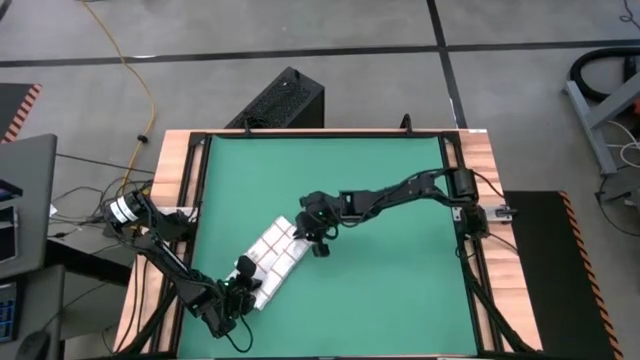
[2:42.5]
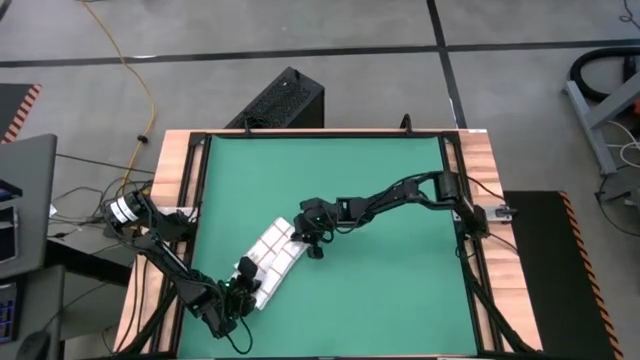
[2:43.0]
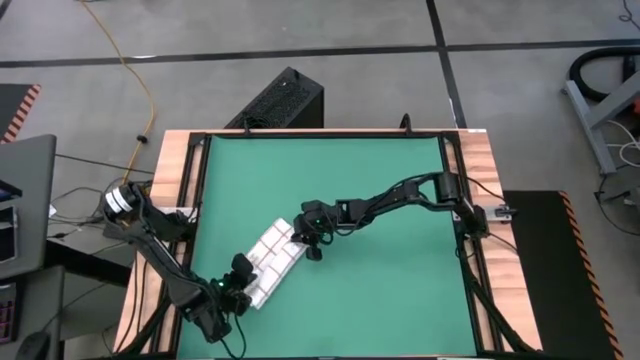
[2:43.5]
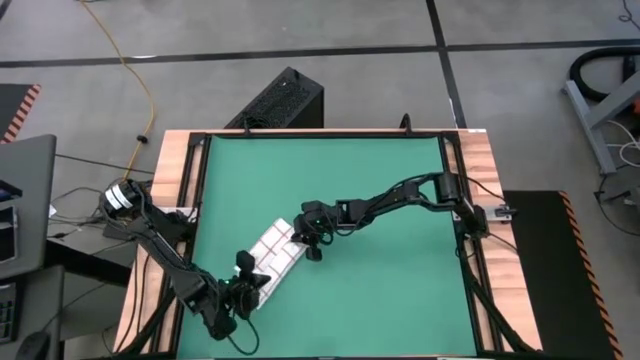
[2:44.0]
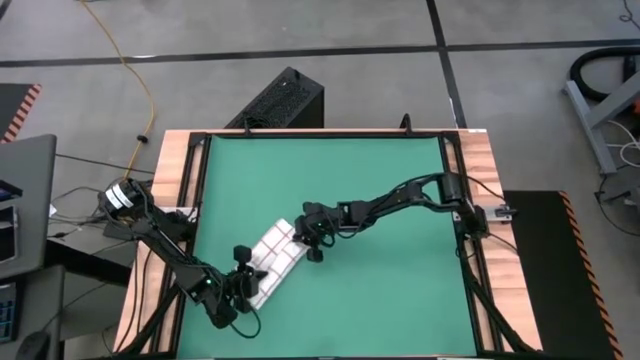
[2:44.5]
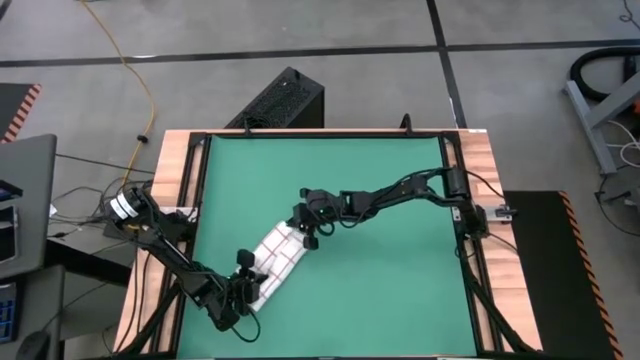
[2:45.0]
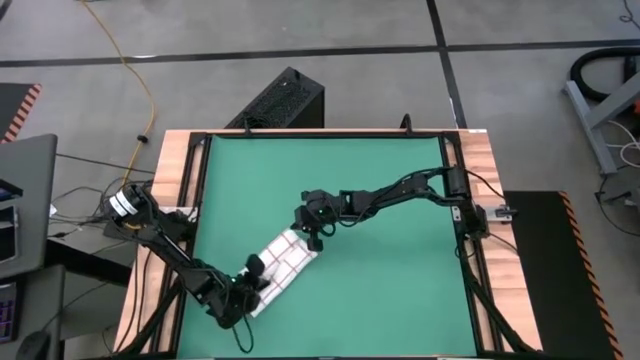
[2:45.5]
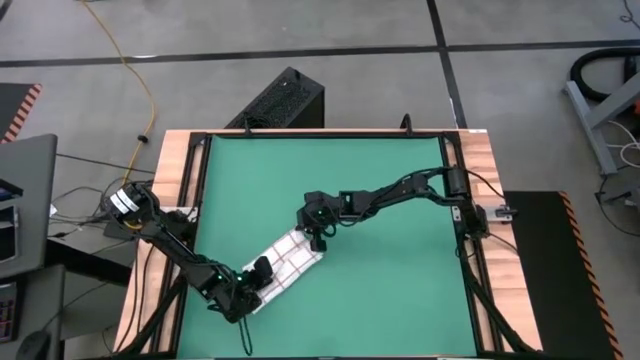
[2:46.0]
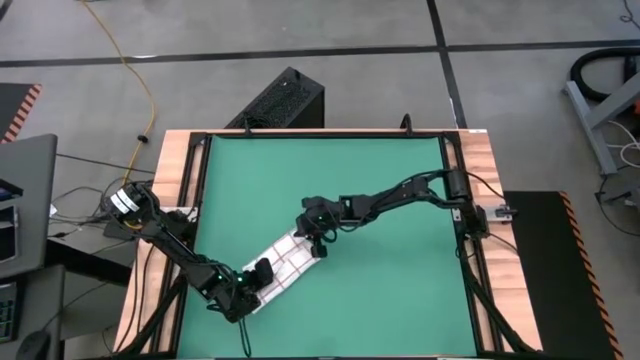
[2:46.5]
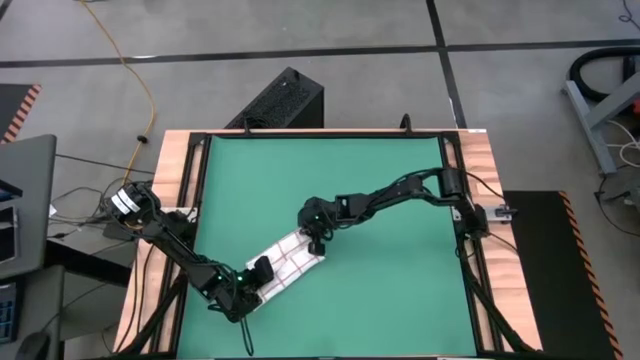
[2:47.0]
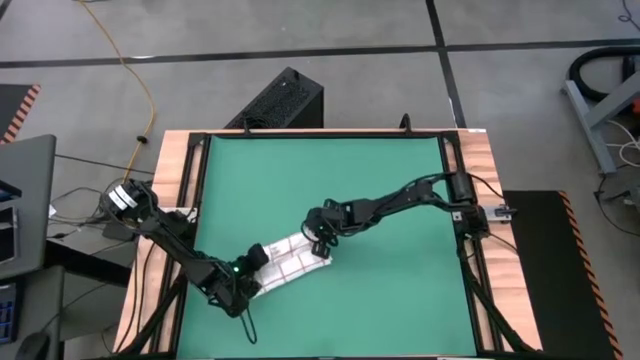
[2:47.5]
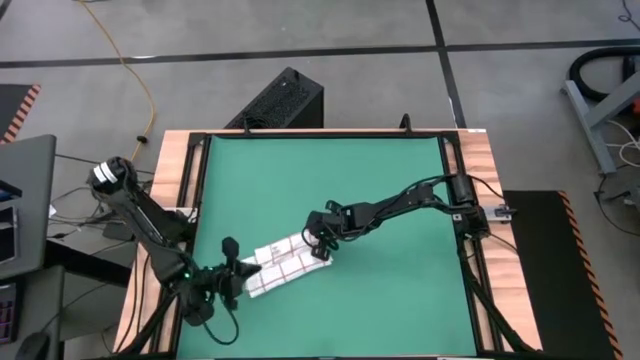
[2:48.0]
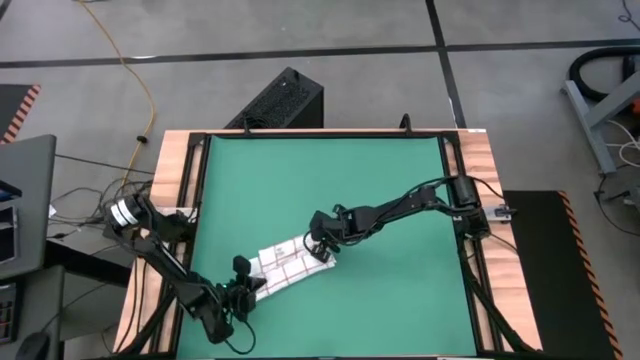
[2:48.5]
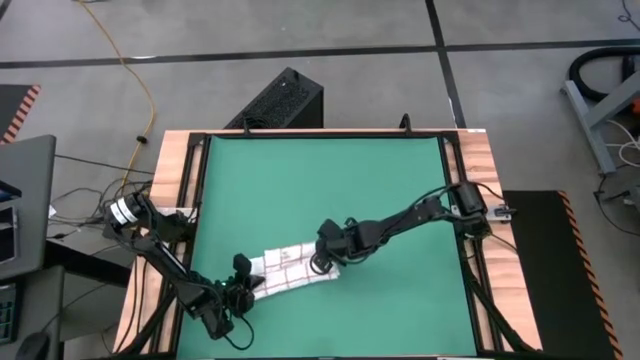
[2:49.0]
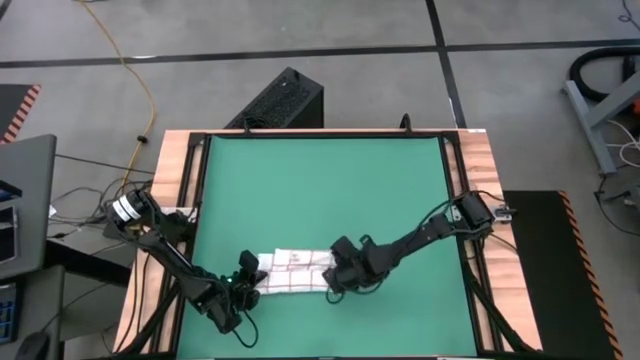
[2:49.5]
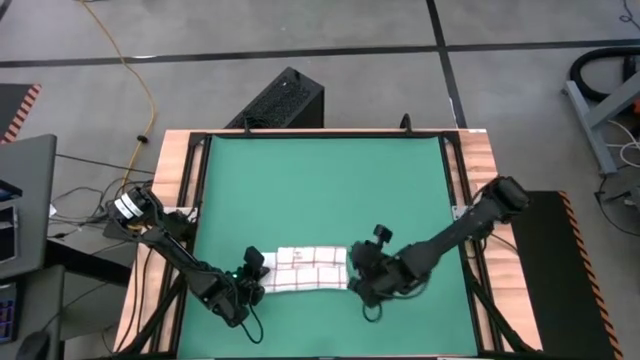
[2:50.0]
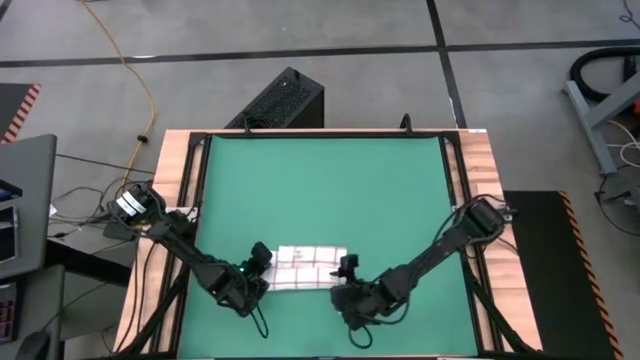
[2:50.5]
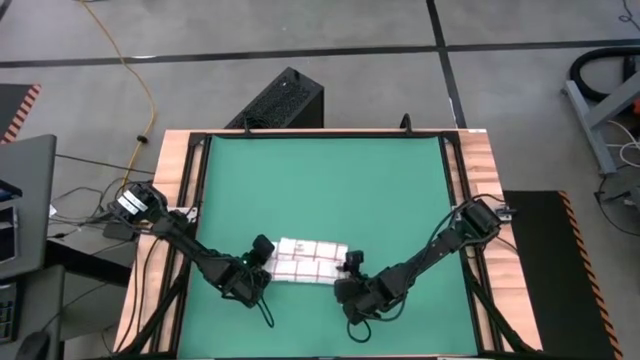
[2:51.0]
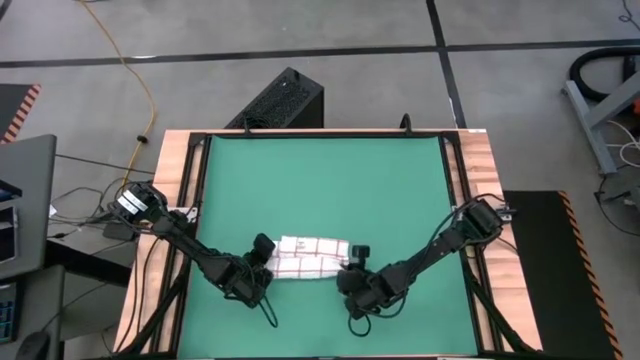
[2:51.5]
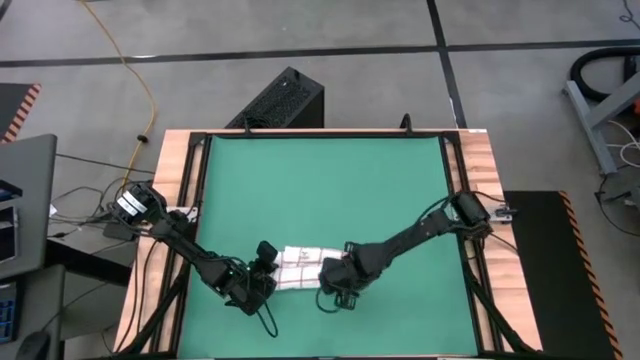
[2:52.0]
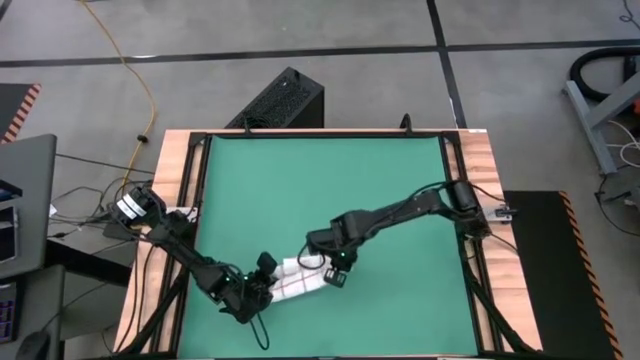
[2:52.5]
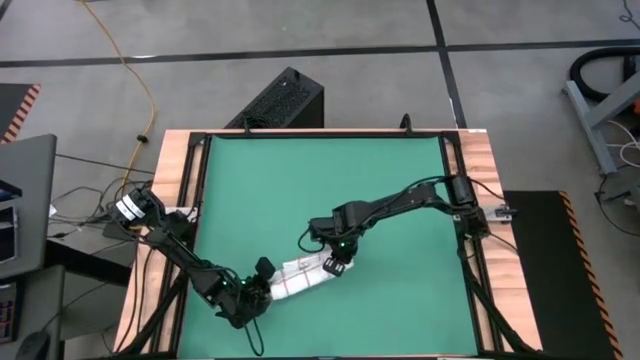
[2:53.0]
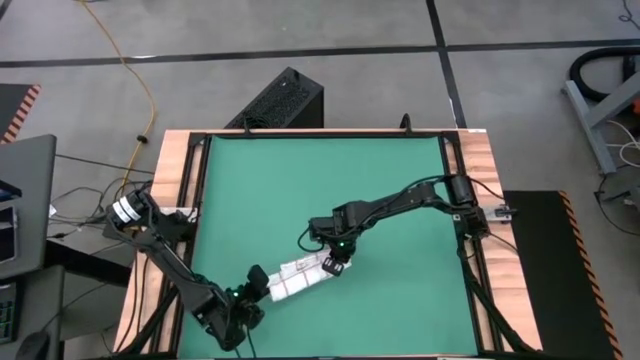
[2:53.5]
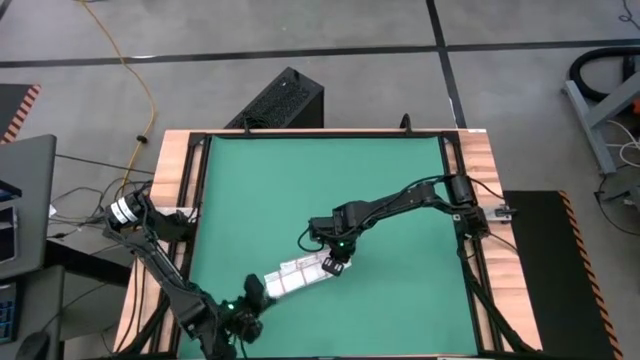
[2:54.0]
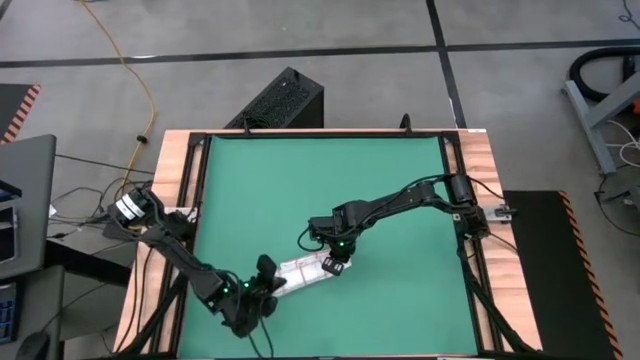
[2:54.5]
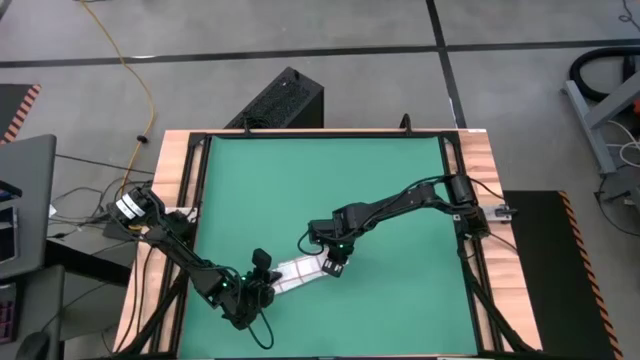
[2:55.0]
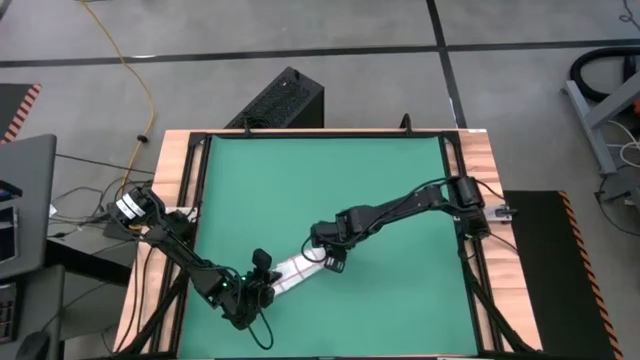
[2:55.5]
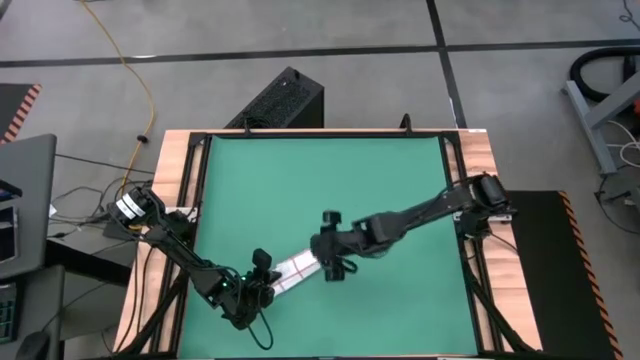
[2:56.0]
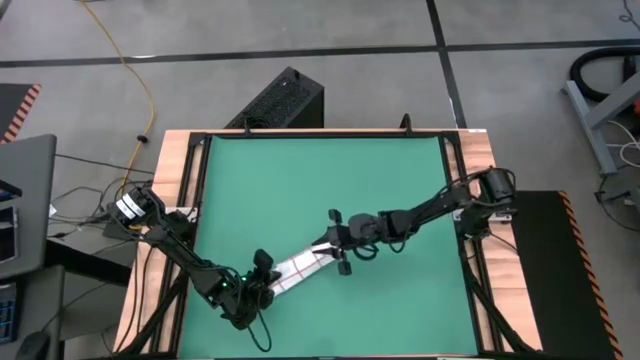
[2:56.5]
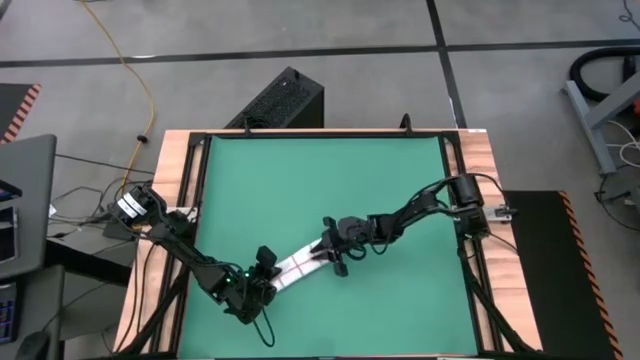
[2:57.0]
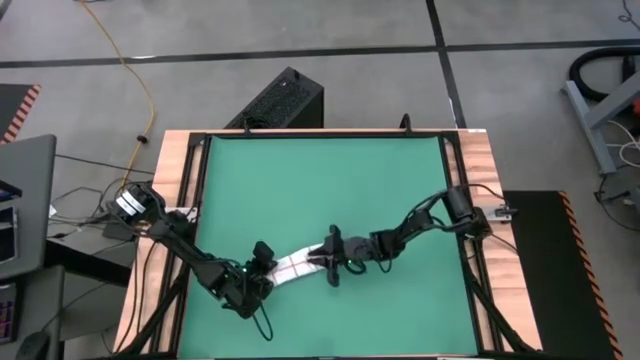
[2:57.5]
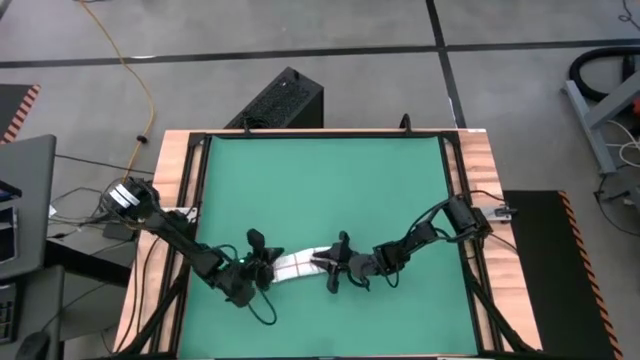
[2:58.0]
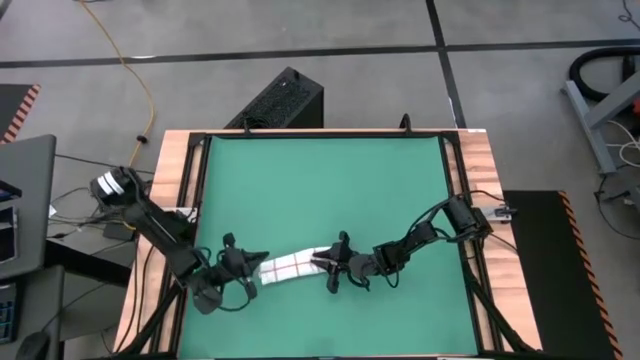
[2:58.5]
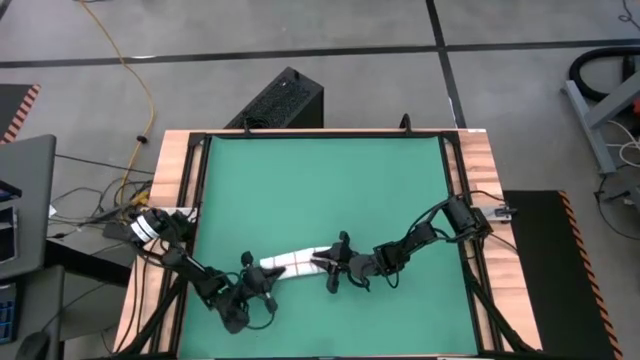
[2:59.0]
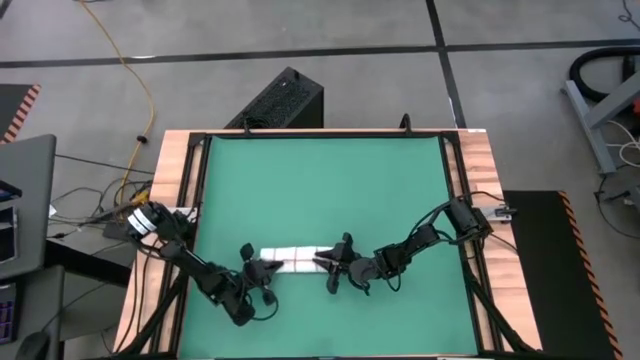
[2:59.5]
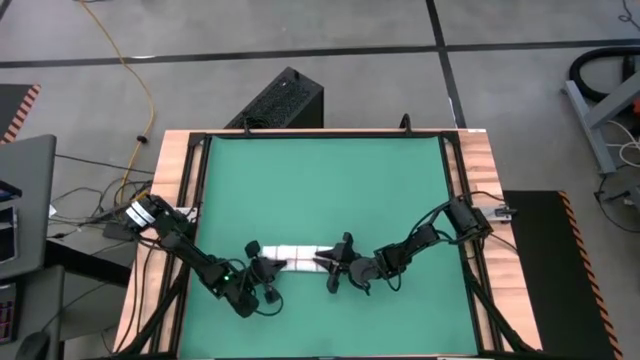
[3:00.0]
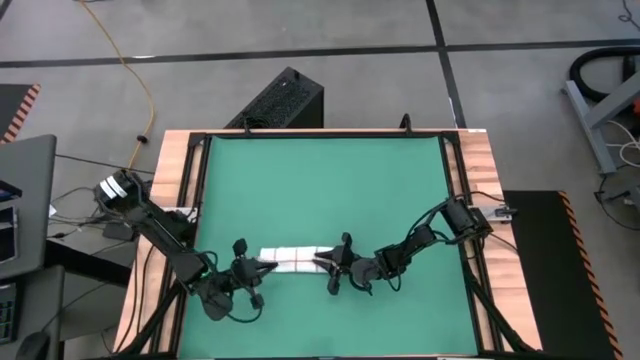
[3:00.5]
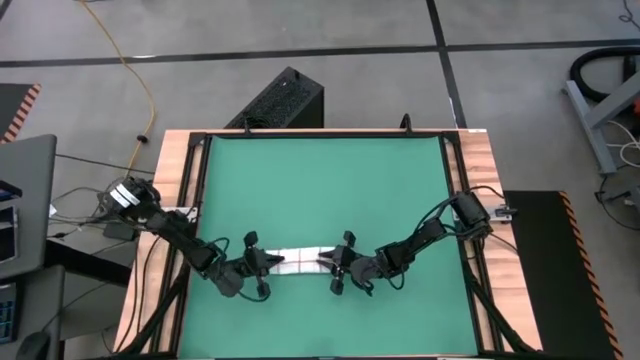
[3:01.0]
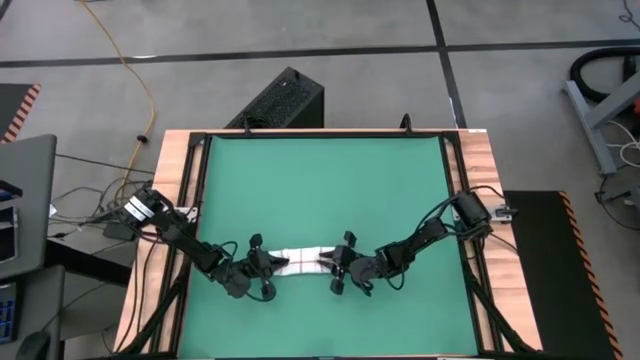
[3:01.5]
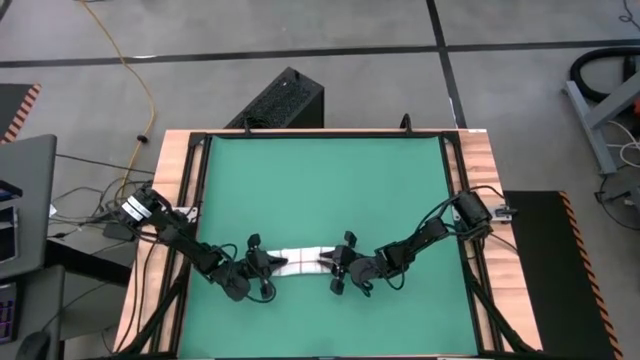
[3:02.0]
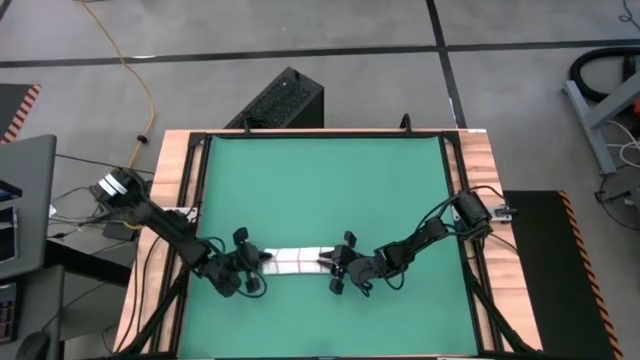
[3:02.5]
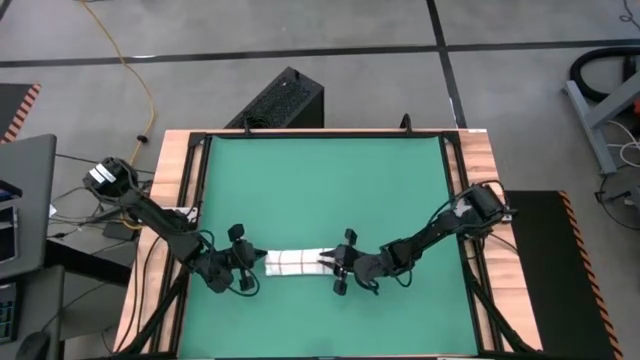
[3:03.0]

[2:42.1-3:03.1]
Task: Roll towel
Roll the white towel
